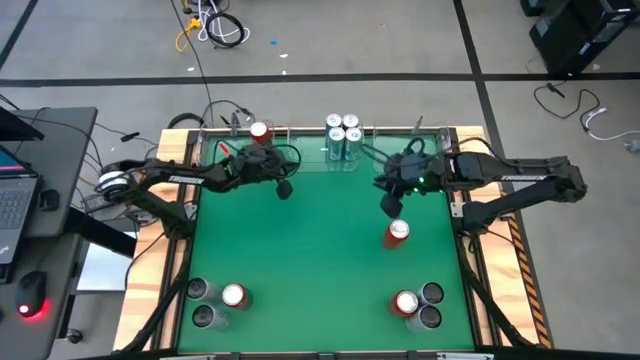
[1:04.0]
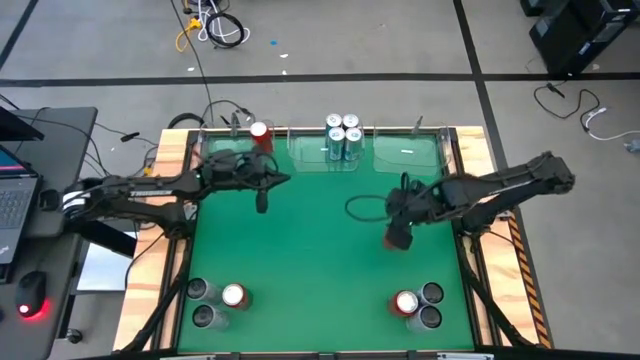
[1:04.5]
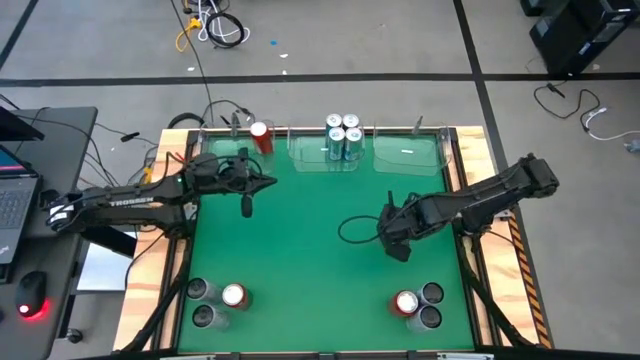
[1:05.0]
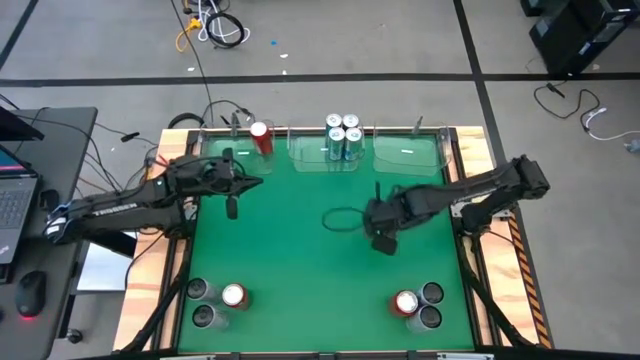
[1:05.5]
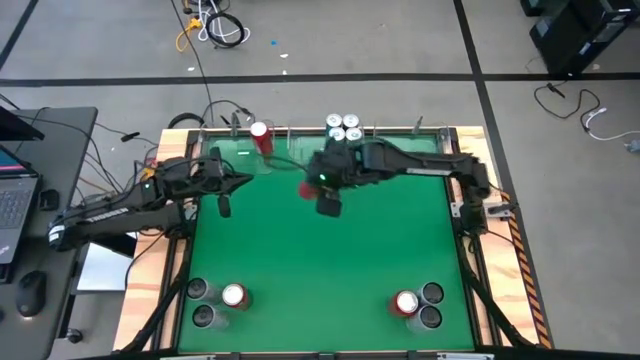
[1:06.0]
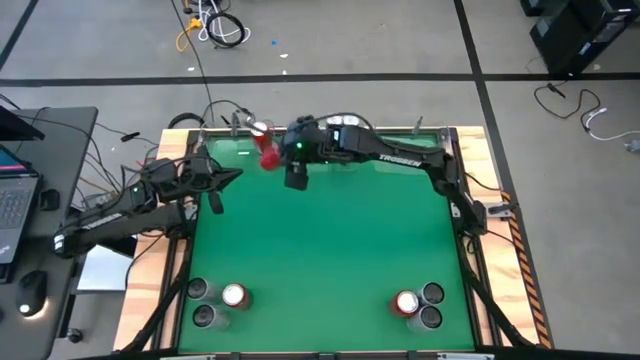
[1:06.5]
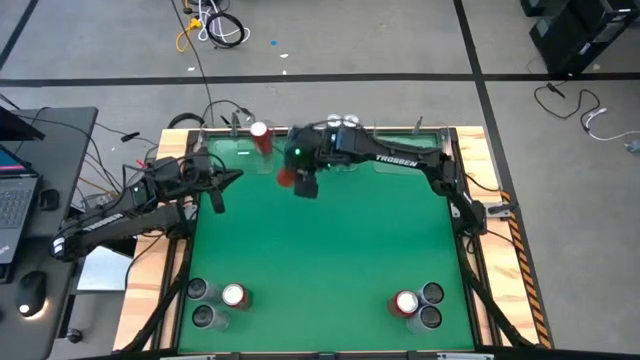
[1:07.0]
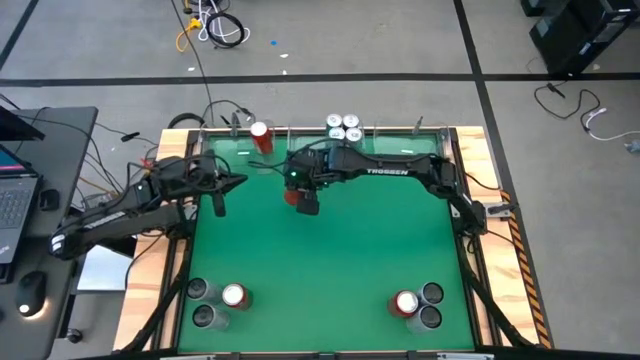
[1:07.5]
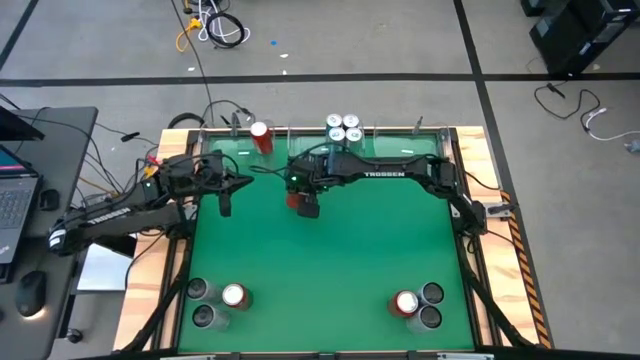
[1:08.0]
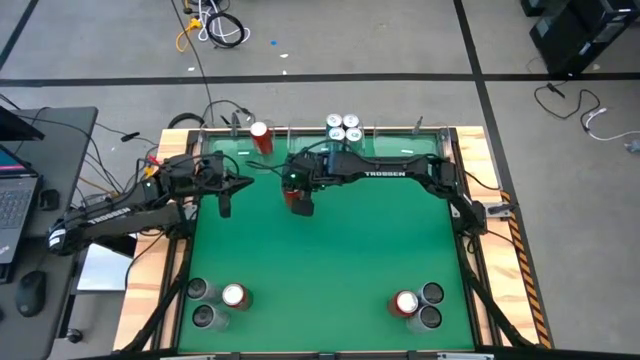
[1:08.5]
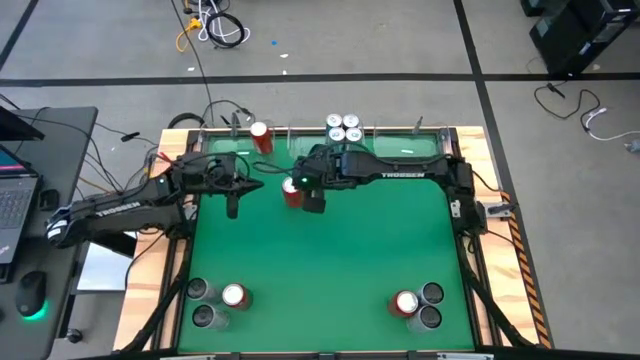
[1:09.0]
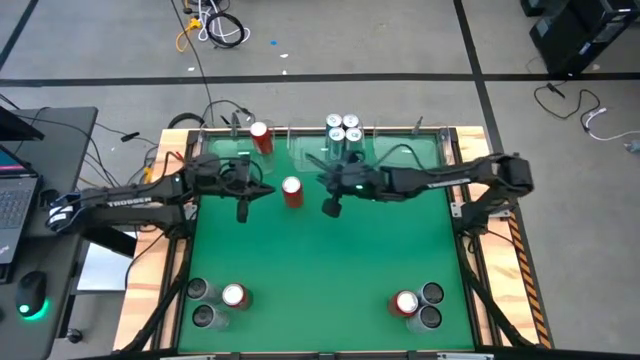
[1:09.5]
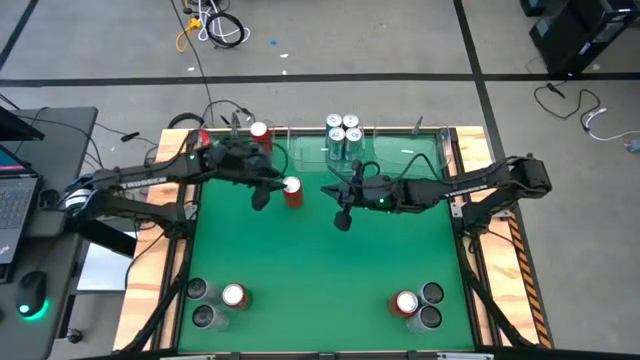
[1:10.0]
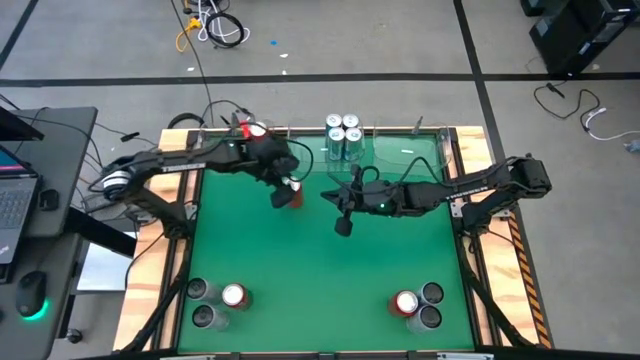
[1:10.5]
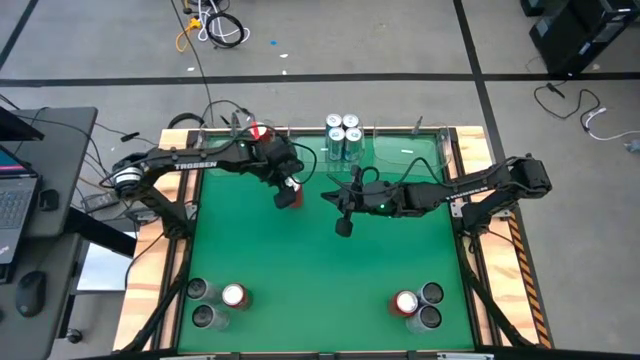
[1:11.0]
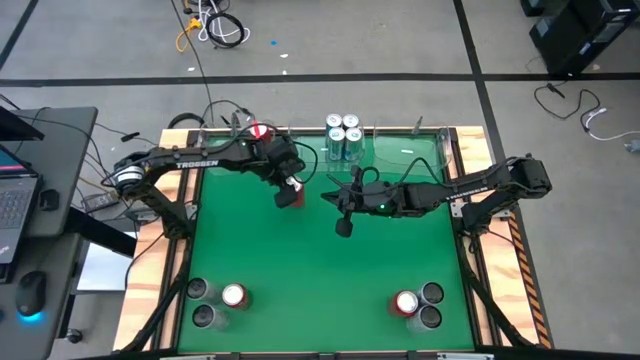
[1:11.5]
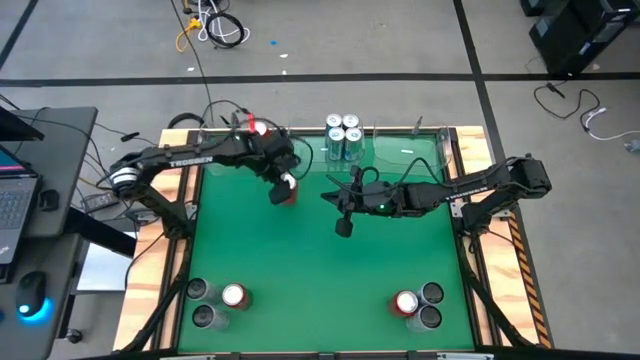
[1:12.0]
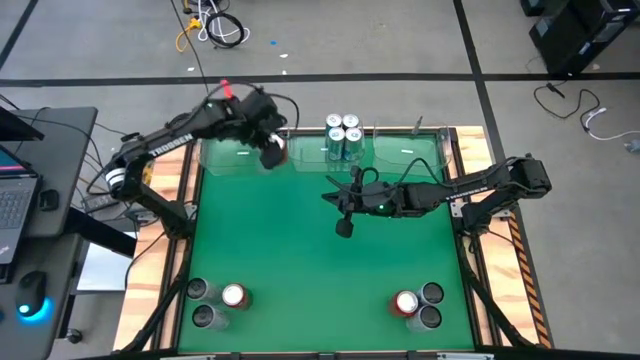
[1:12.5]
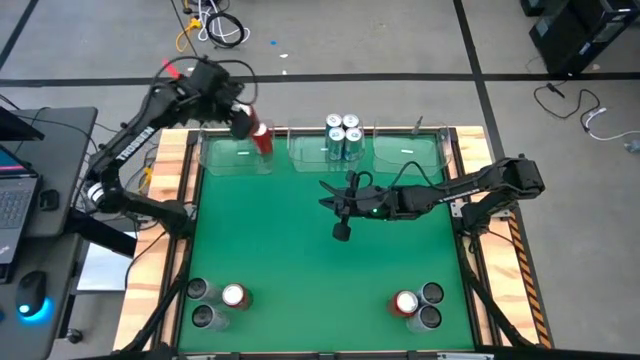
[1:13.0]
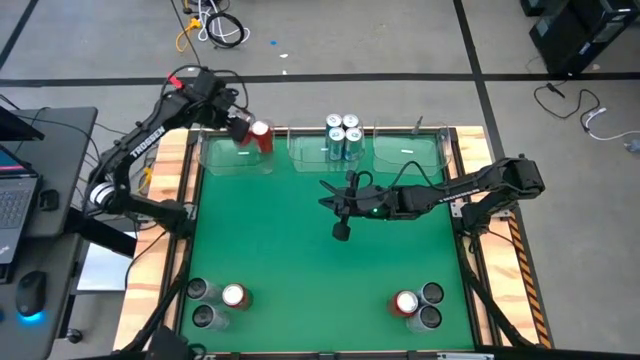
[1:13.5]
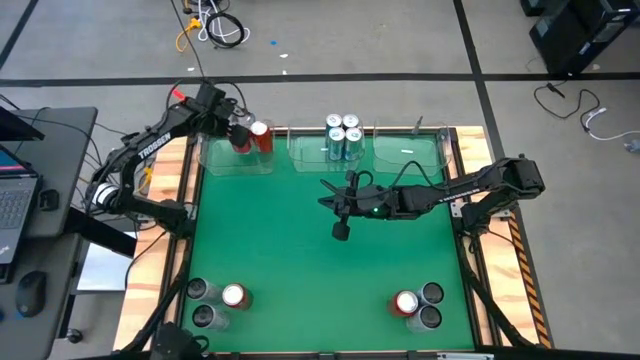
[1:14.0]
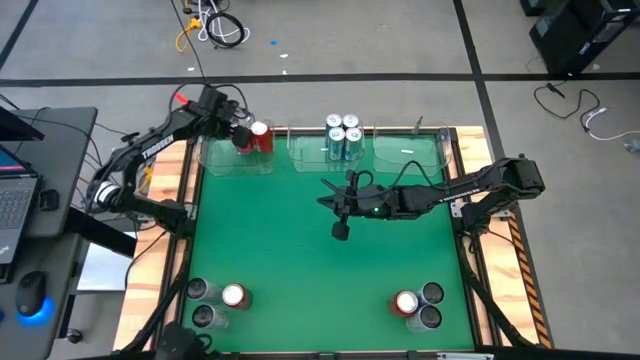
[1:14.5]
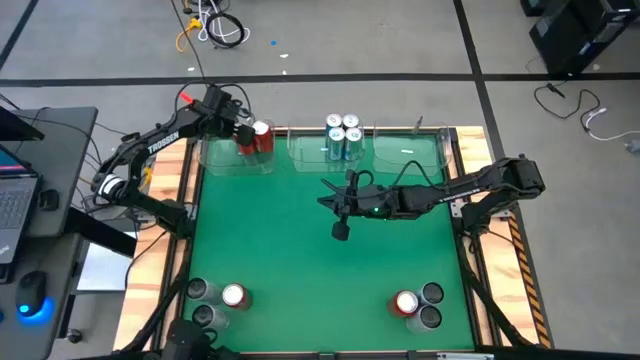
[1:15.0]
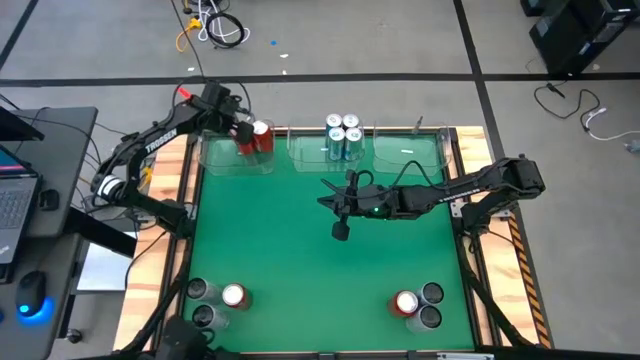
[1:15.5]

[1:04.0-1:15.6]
Task: Sort soda cans
Put the red soda can into the transparent left bin

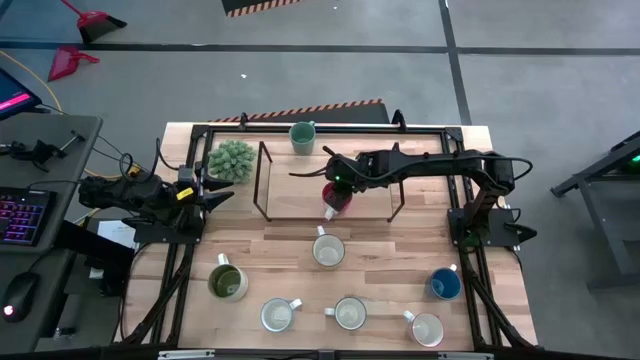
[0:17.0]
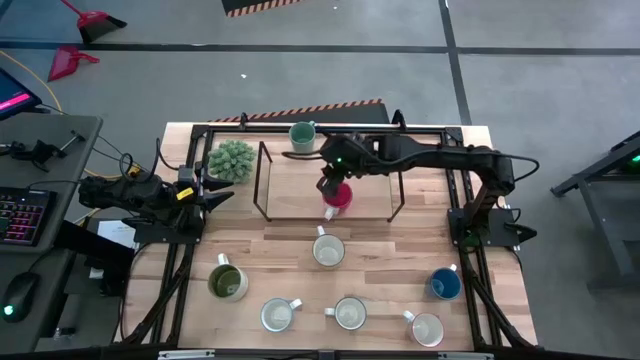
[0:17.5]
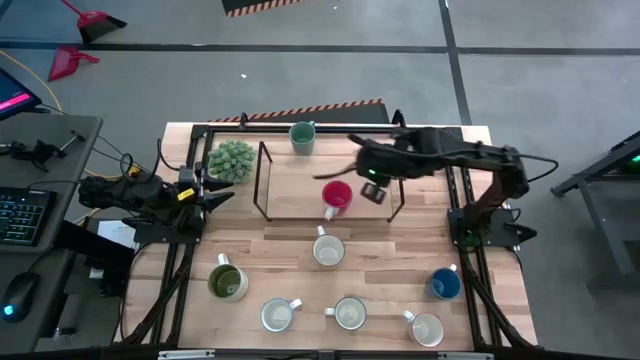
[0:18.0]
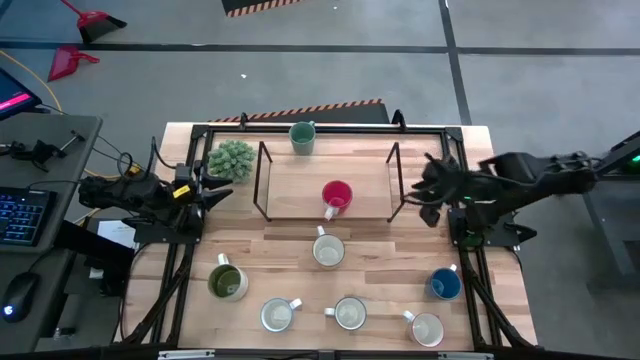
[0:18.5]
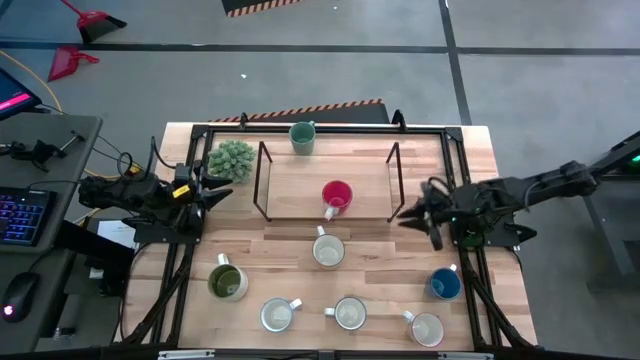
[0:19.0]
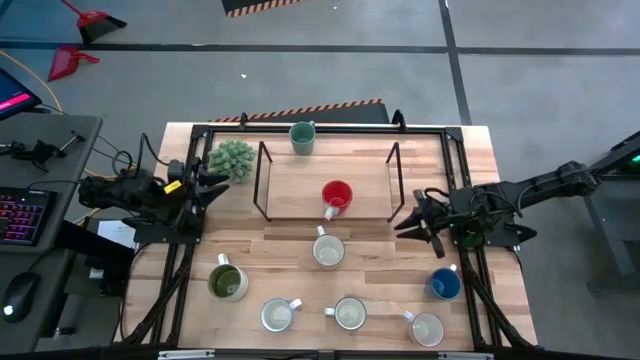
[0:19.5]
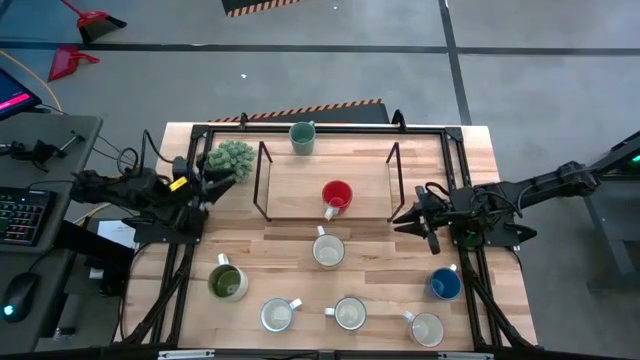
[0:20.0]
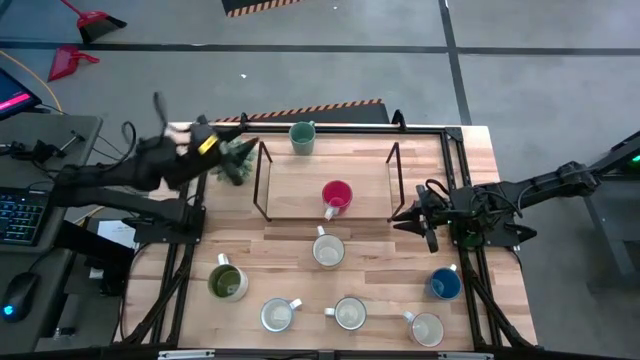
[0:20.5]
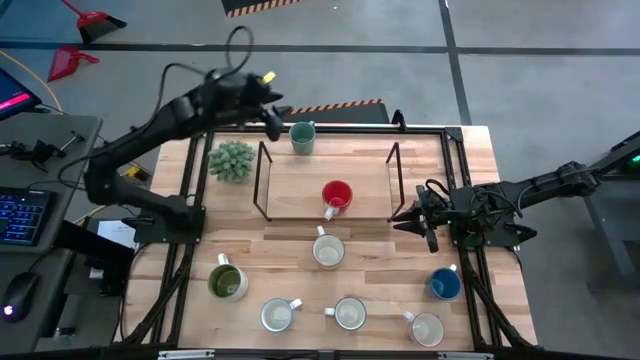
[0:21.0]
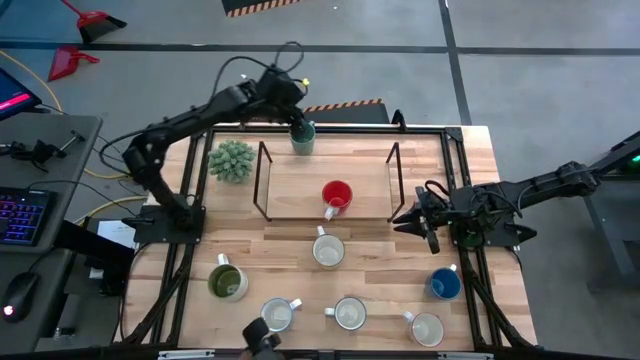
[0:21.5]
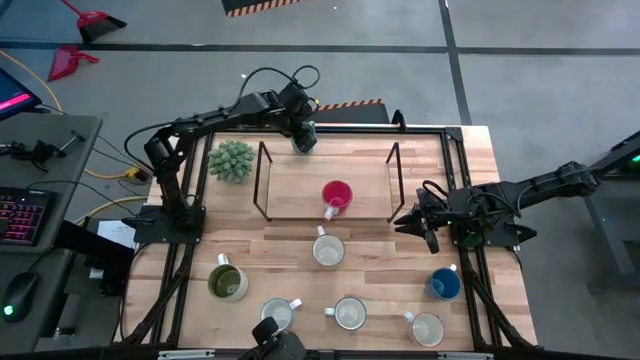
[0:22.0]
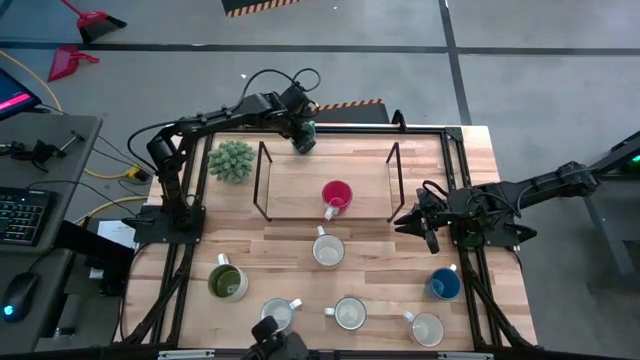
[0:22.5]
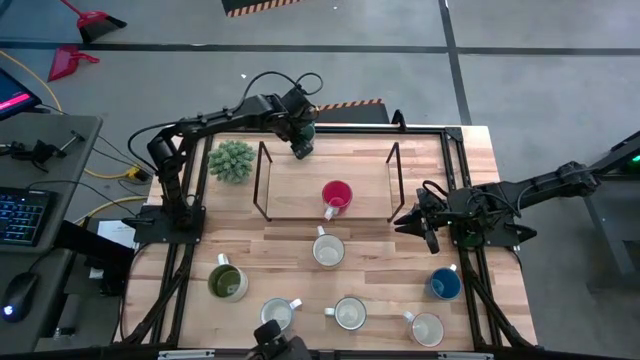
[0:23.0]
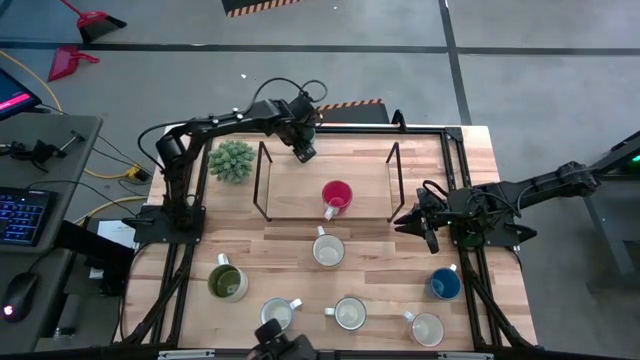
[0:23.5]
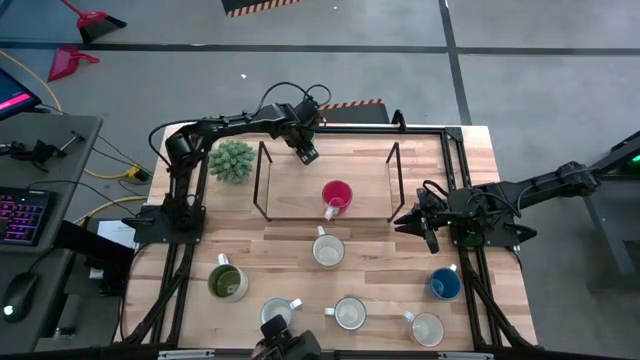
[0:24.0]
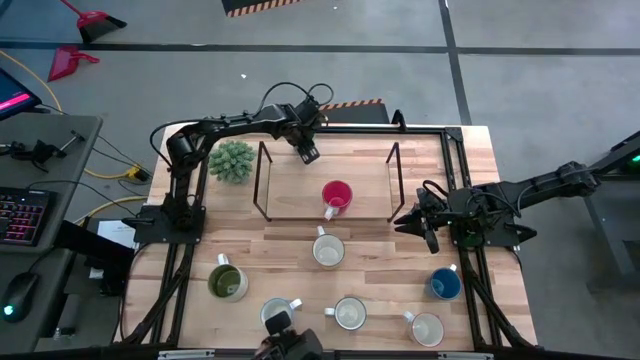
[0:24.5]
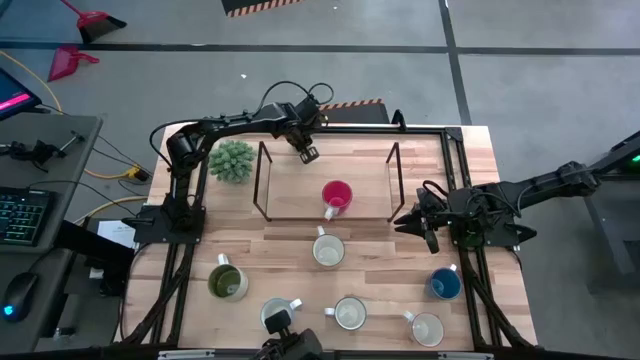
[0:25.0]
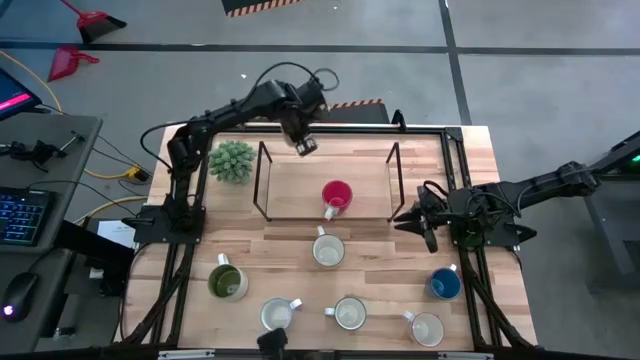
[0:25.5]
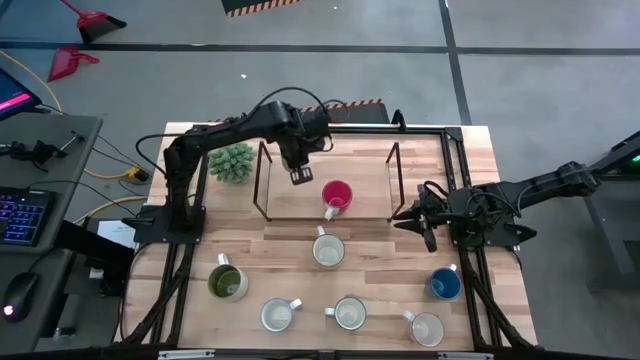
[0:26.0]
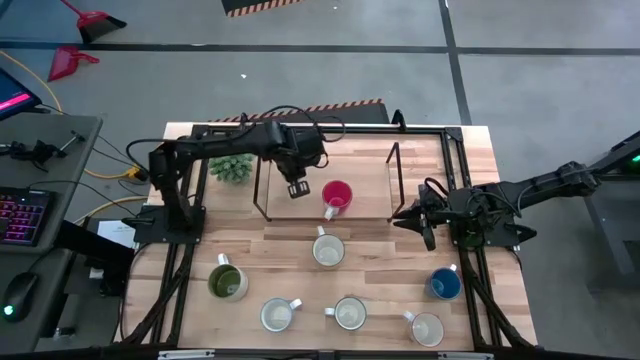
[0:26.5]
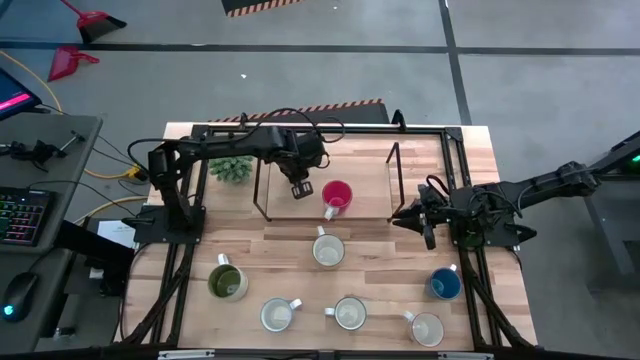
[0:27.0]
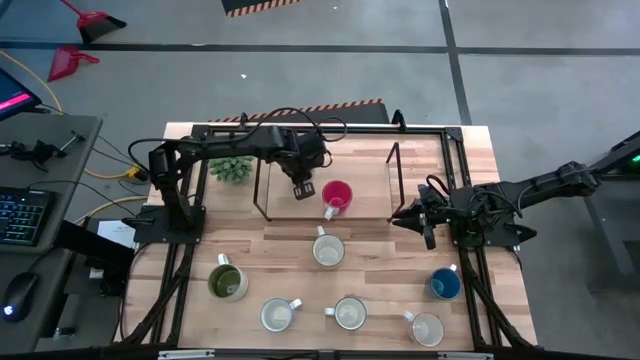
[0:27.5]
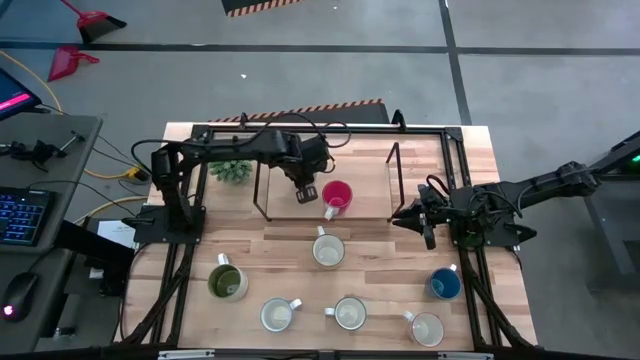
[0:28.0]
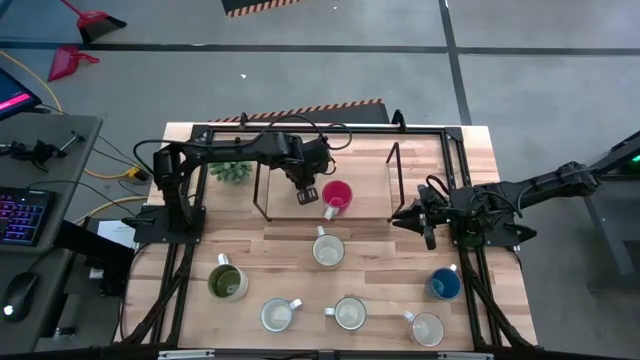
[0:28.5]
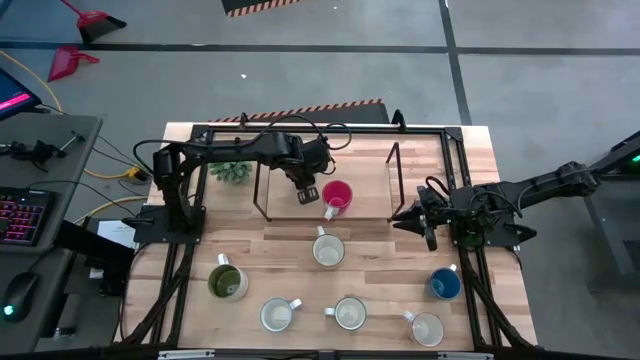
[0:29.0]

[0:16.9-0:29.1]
Task: Place coffee mugs
Put the green mug on the shelf
